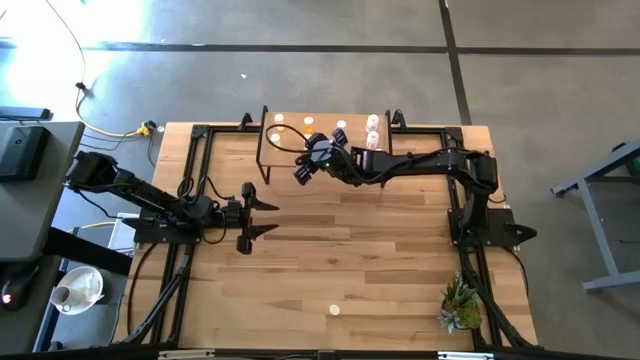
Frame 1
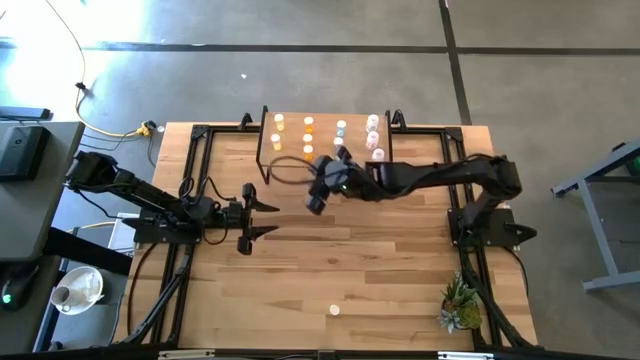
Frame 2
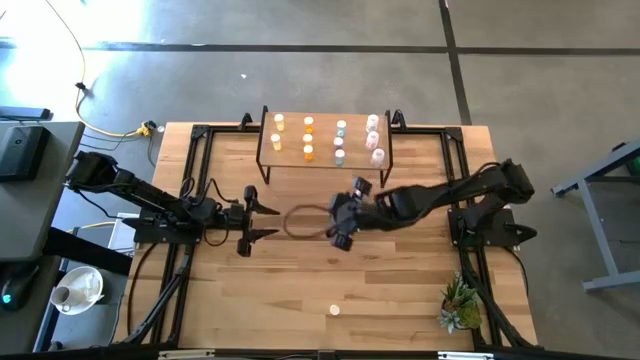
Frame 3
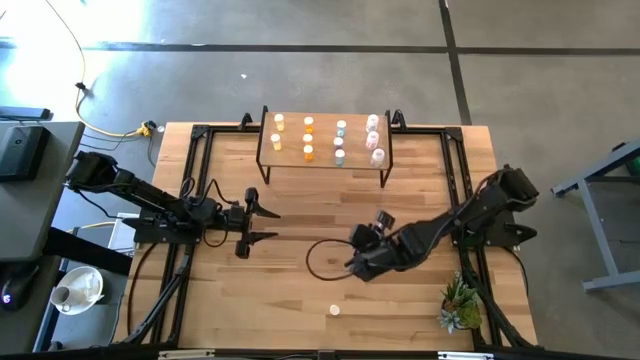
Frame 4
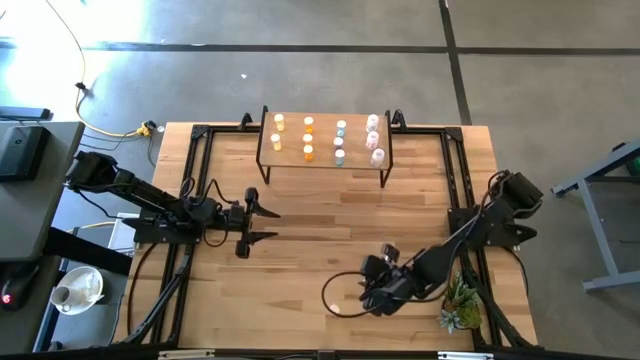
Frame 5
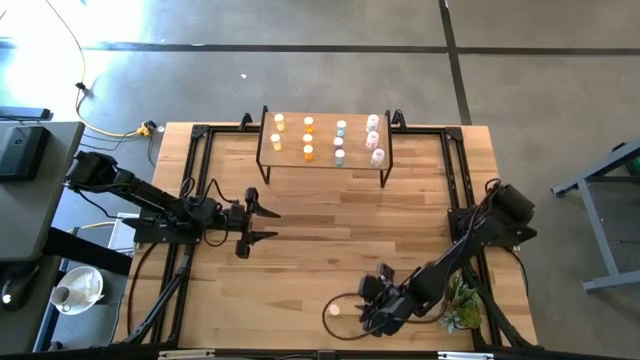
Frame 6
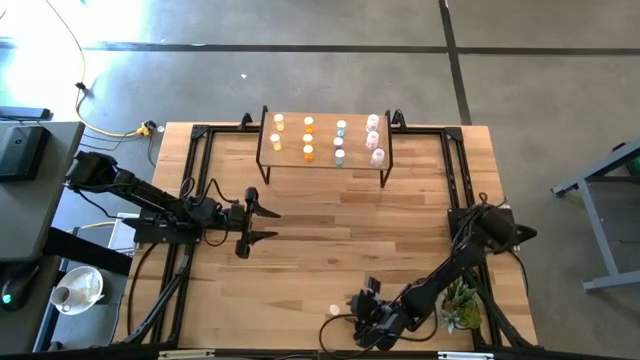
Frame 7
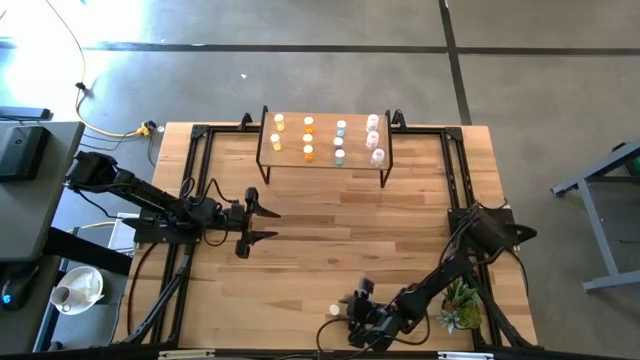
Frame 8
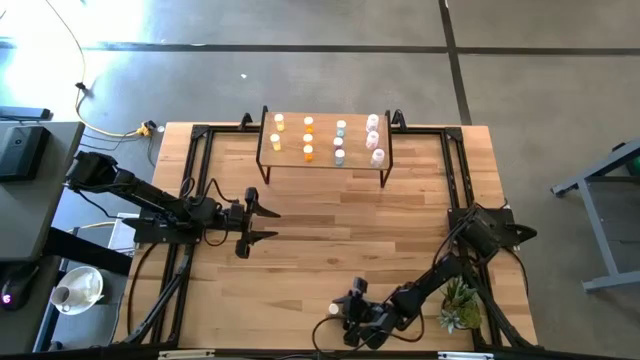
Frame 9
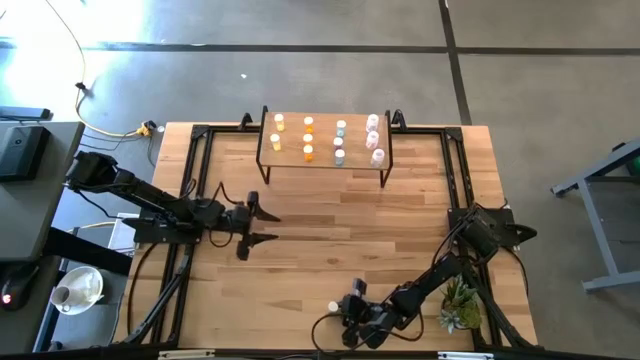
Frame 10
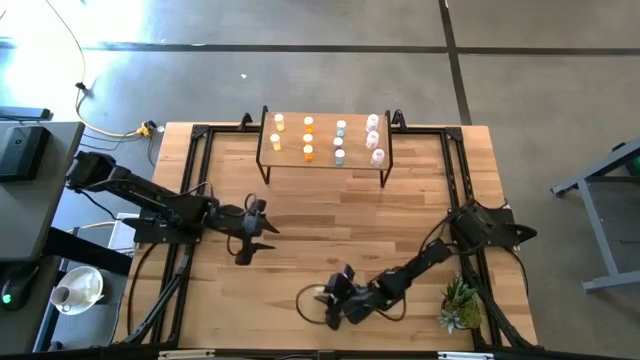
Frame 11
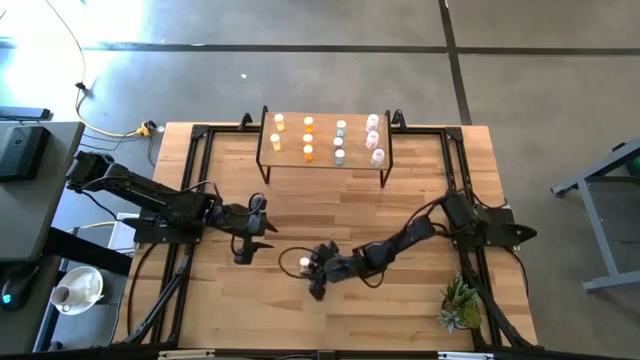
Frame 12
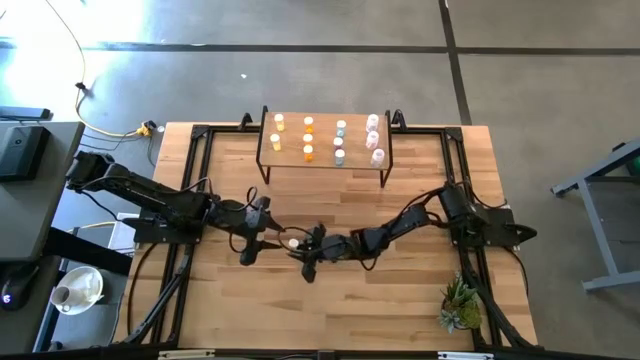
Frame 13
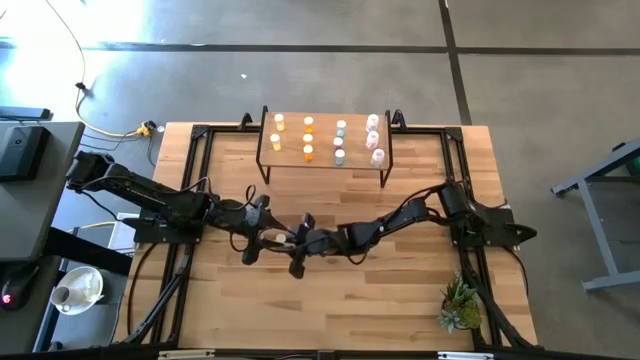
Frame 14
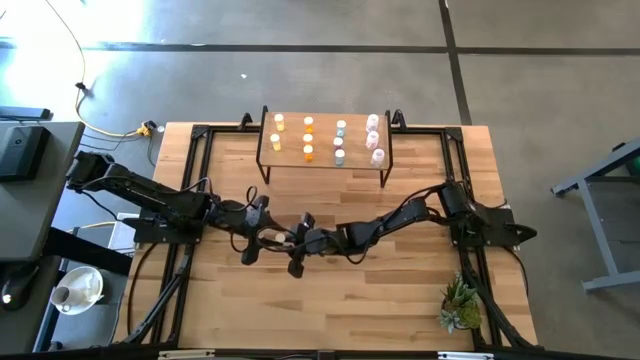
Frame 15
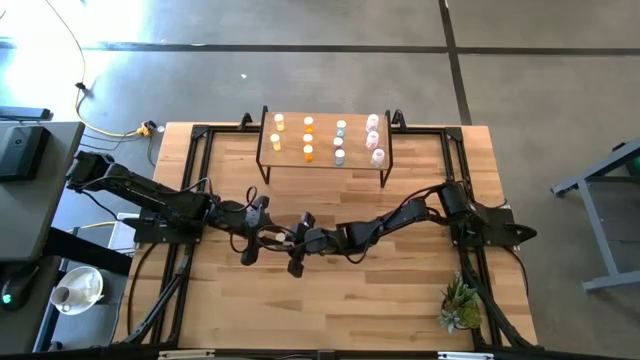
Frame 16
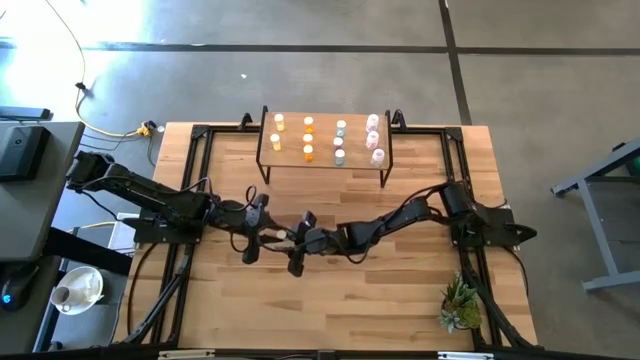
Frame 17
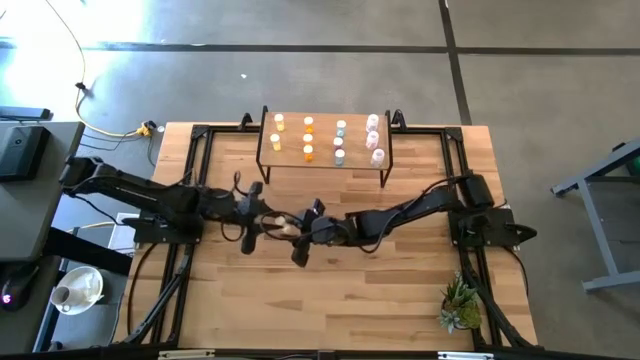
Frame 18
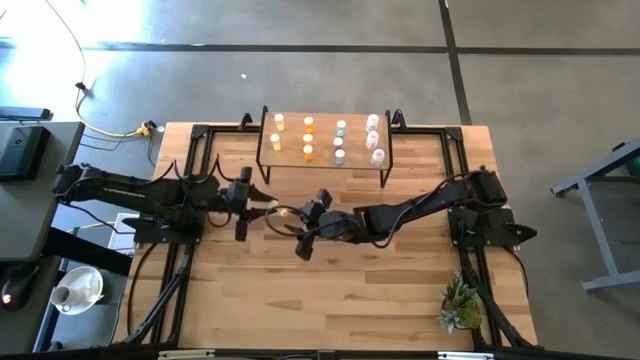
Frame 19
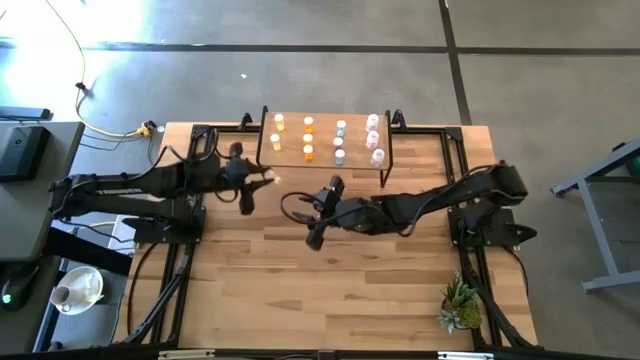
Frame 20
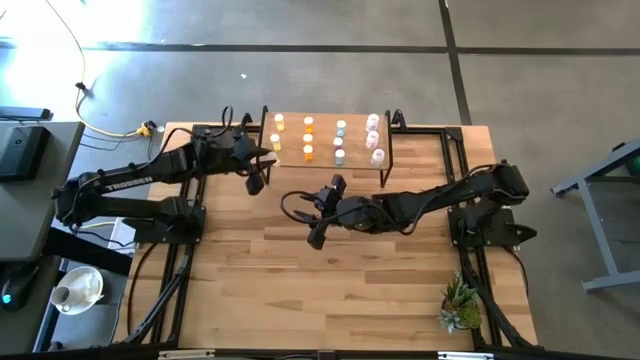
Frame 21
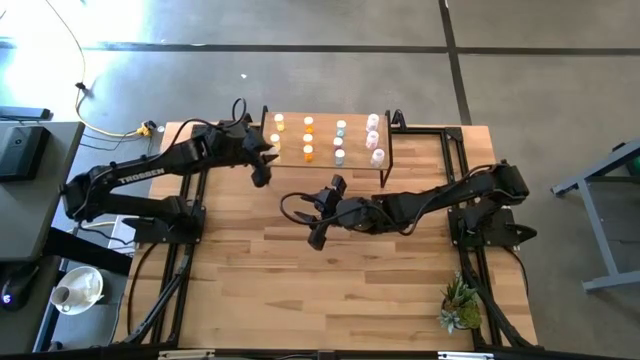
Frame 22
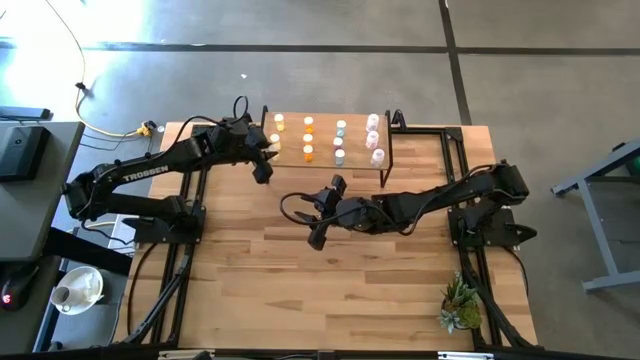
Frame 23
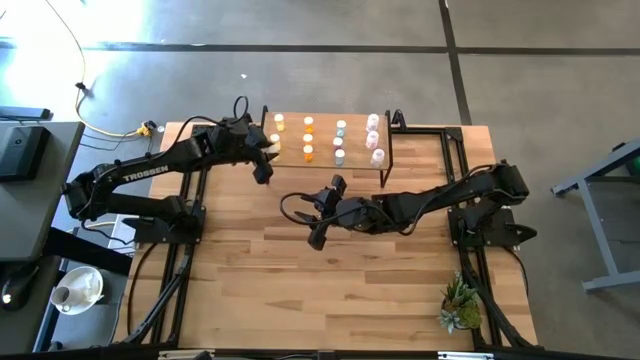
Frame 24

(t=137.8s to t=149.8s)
Task: Pick and place medicine bottles onto shelf by color
Put the yellow pill bottle on the shelf aligned with the yellow pill bottles

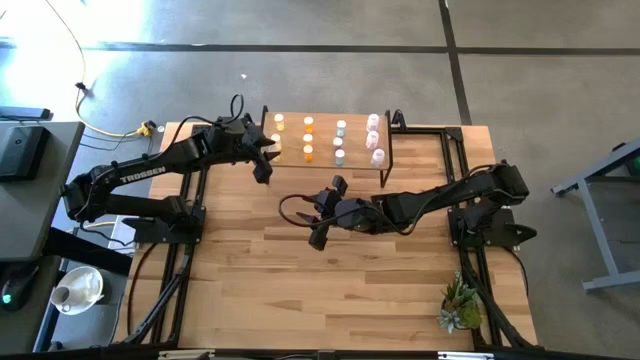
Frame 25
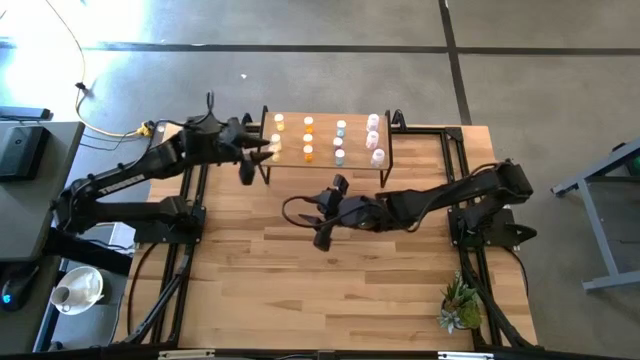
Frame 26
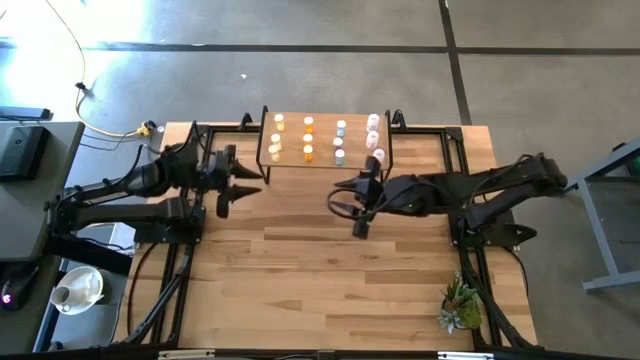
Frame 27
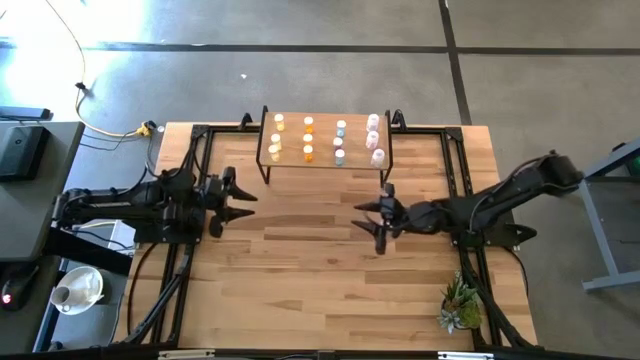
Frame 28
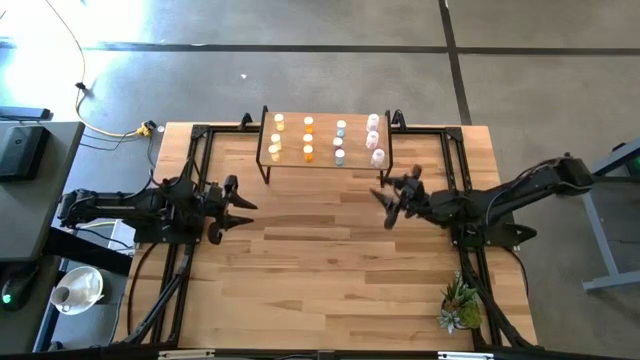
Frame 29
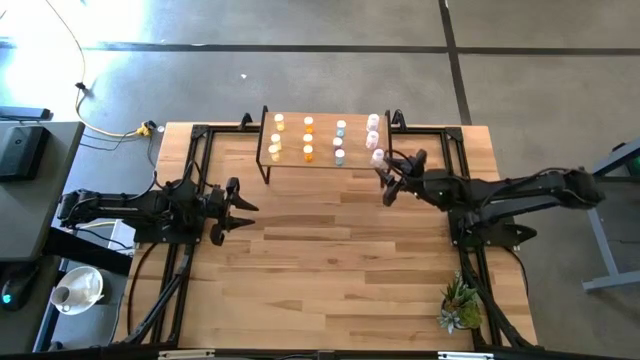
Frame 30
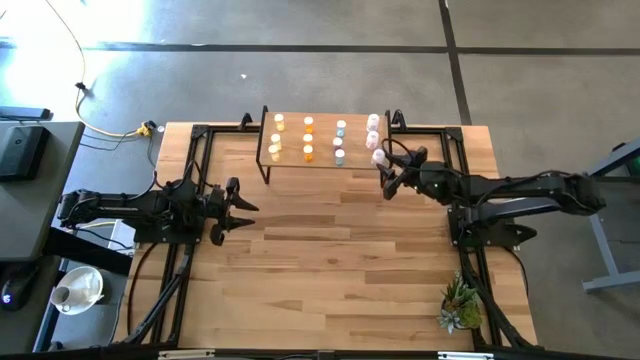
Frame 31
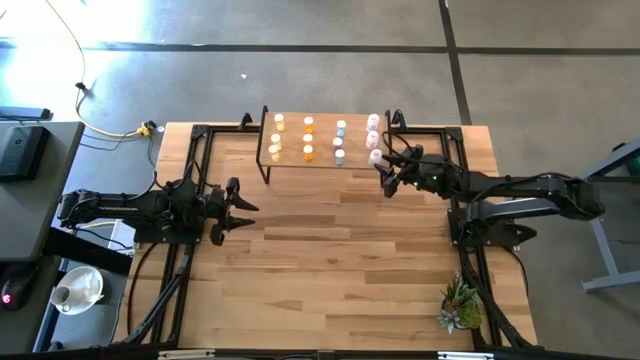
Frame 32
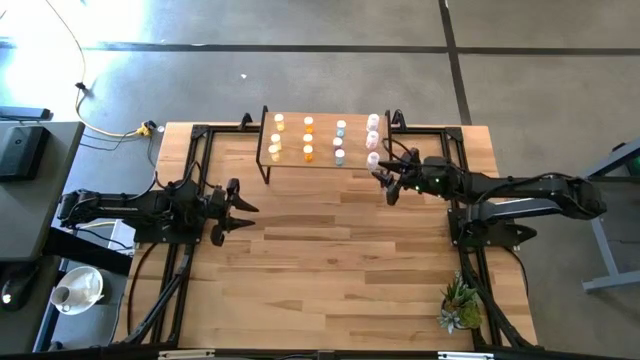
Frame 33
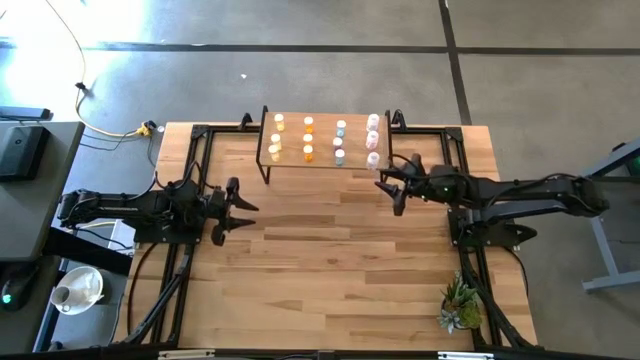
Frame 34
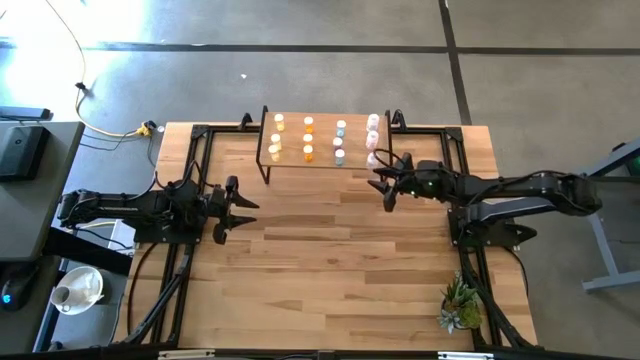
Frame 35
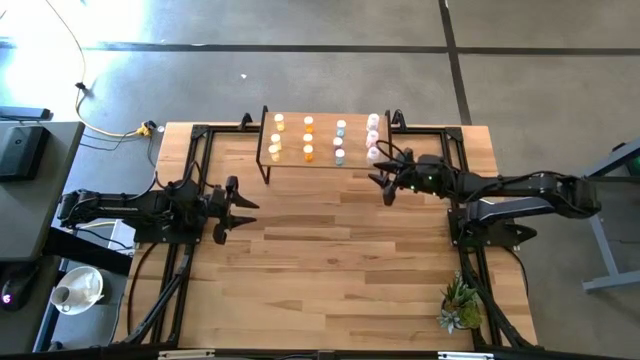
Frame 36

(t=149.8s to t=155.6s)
Adjust the transparent pill bottle on the shelf

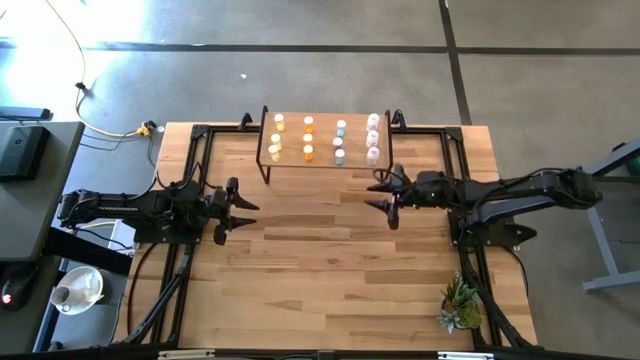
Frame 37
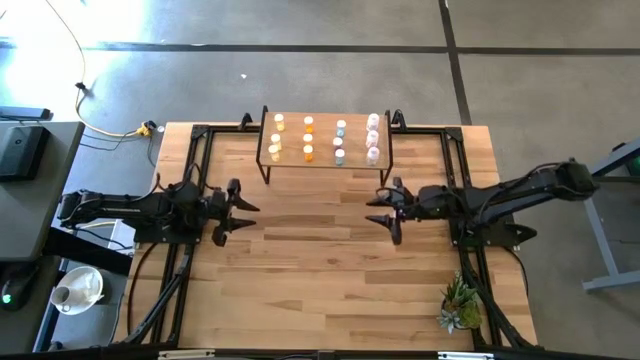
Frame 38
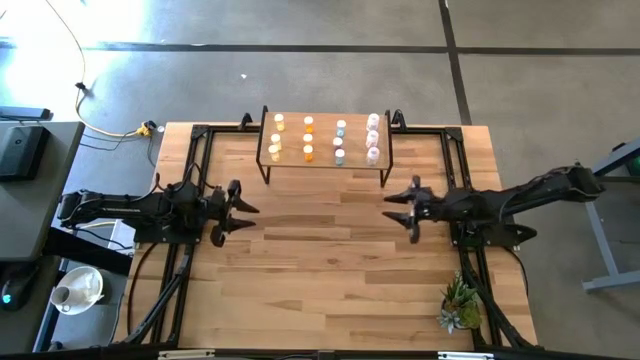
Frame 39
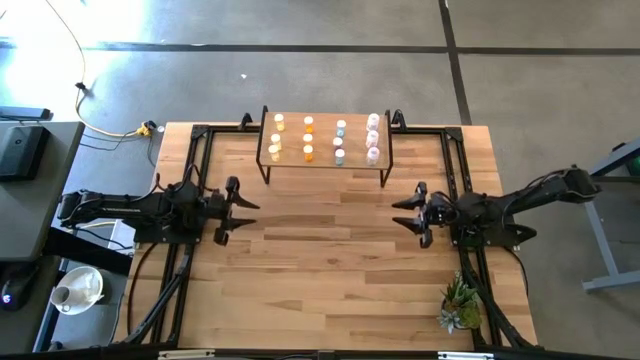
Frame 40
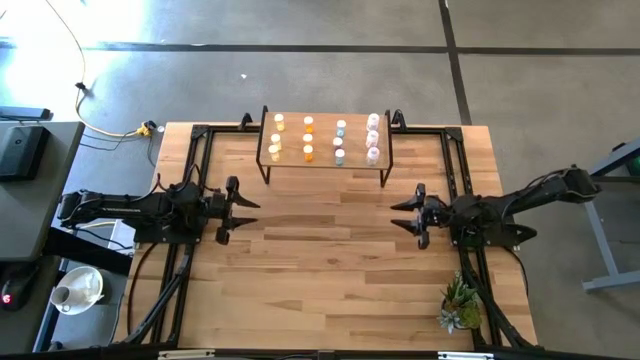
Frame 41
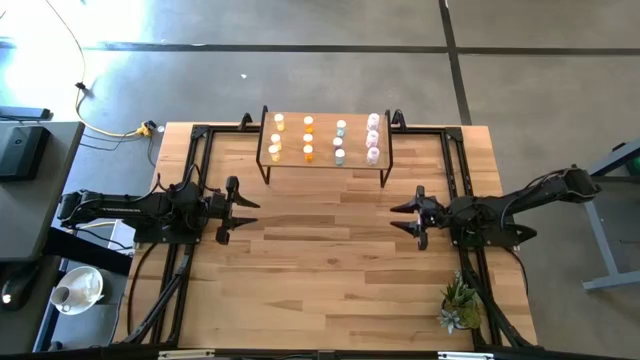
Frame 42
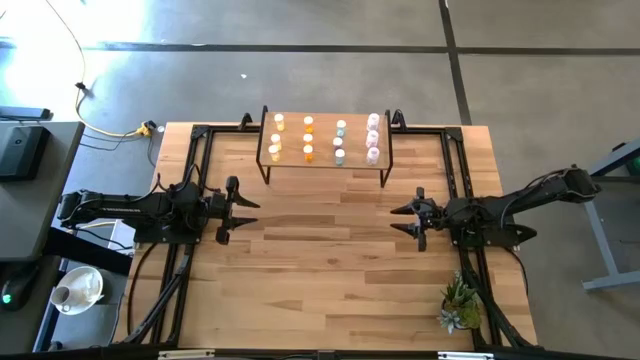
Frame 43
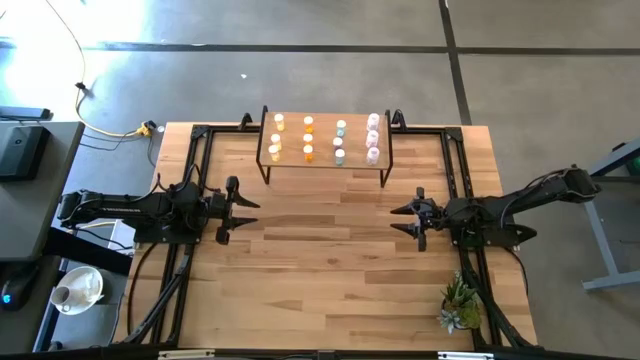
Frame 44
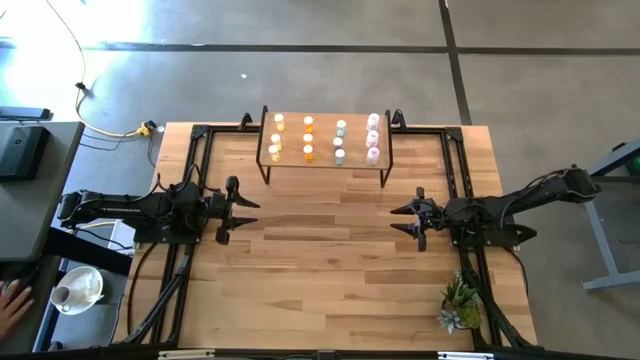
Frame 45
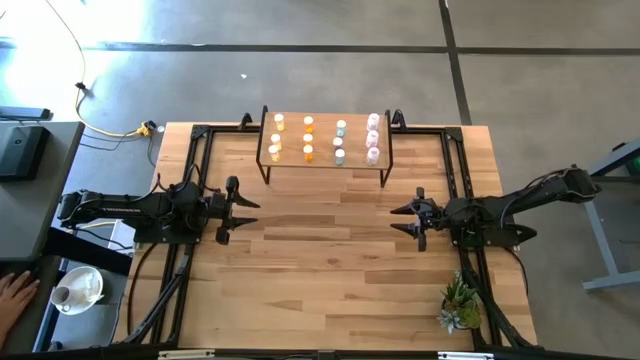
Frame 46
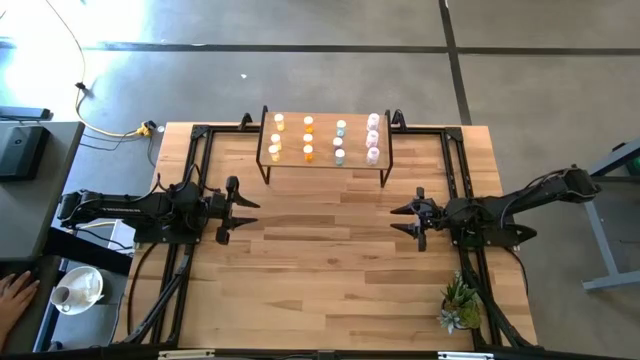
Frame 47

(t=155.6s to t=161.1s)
Return to Home Position
